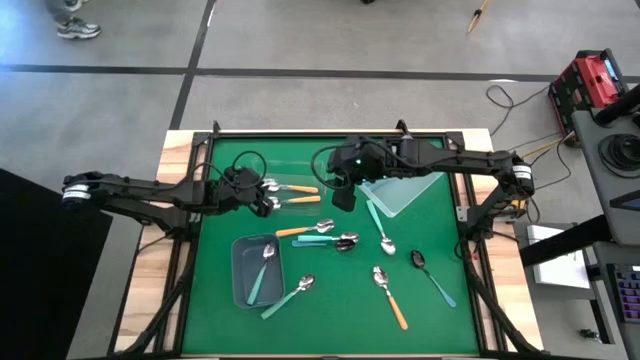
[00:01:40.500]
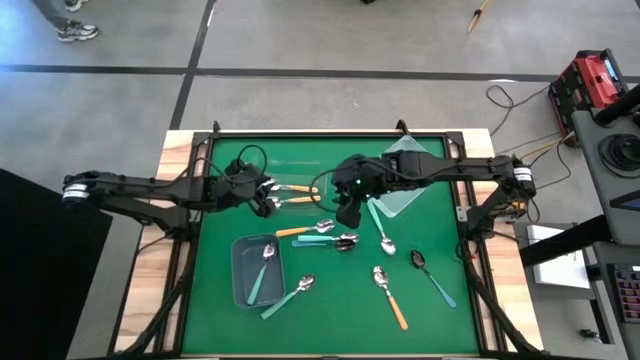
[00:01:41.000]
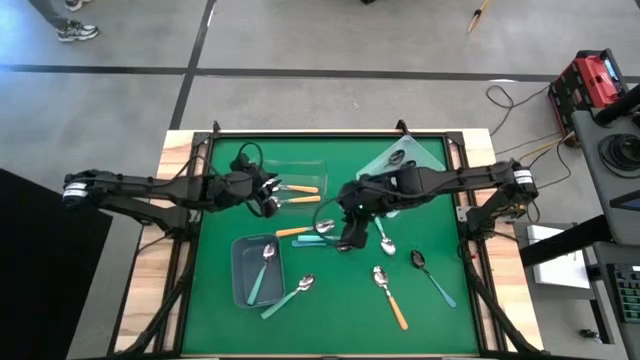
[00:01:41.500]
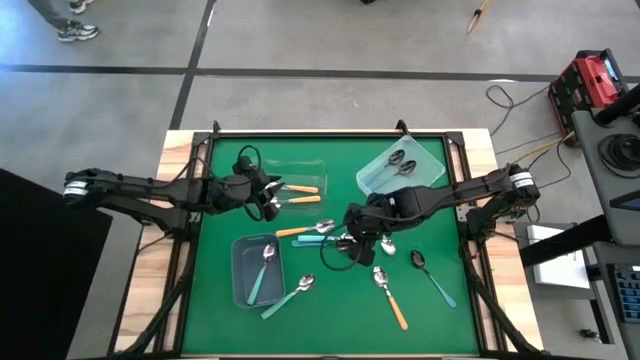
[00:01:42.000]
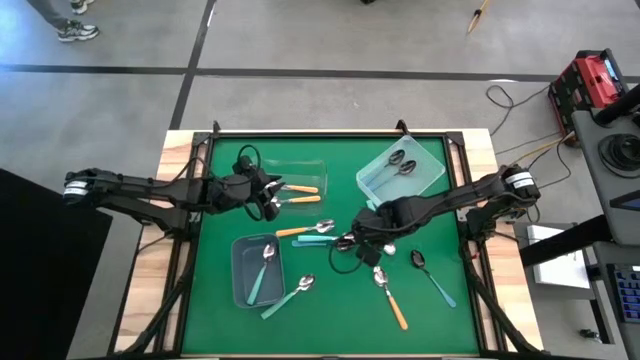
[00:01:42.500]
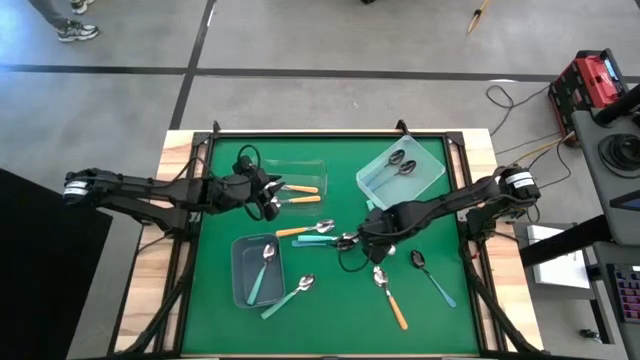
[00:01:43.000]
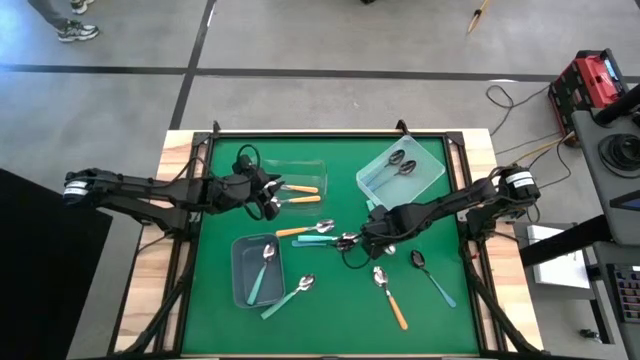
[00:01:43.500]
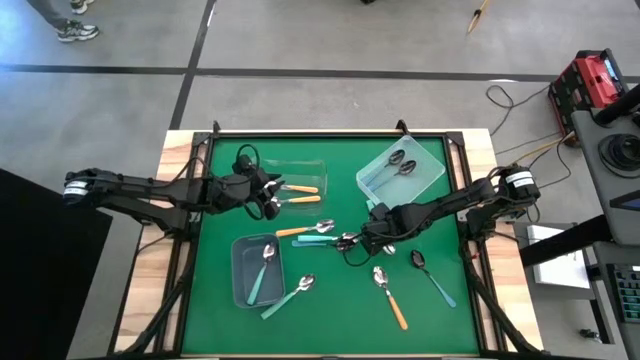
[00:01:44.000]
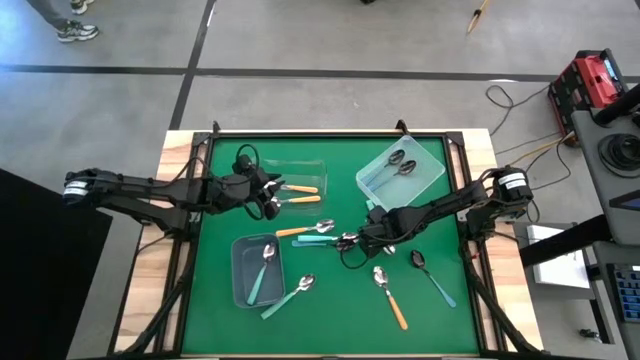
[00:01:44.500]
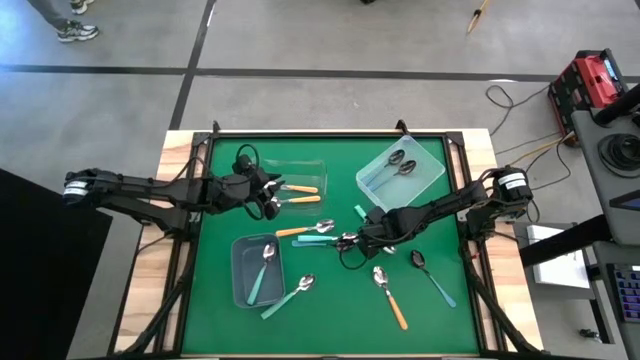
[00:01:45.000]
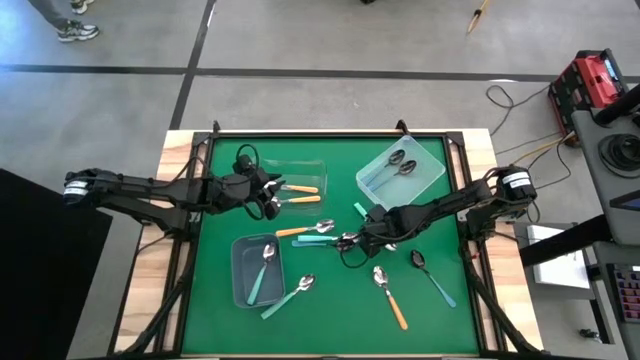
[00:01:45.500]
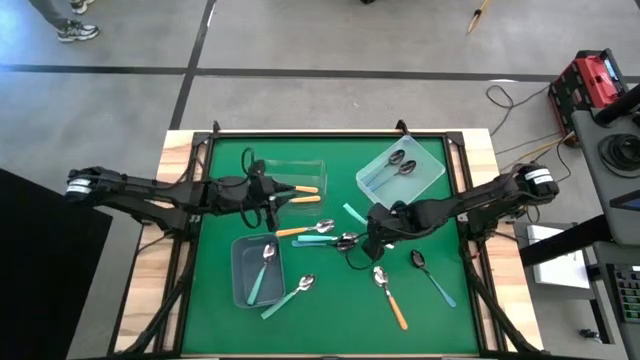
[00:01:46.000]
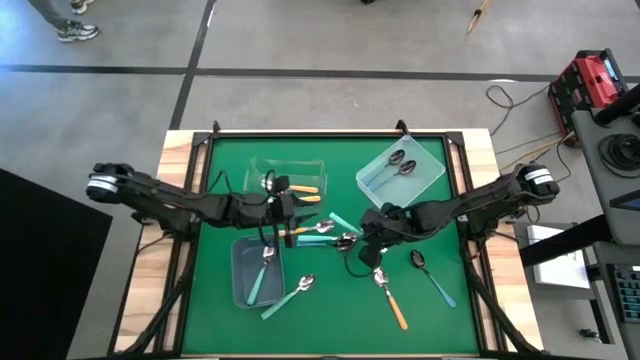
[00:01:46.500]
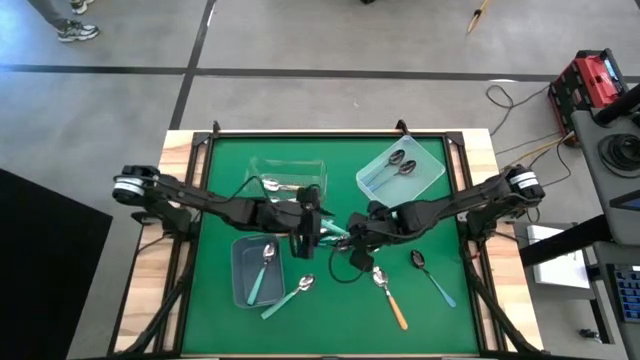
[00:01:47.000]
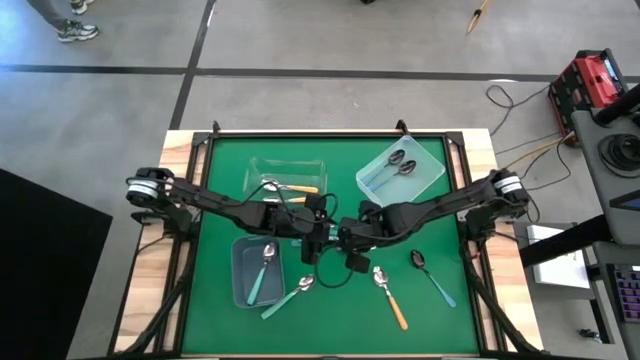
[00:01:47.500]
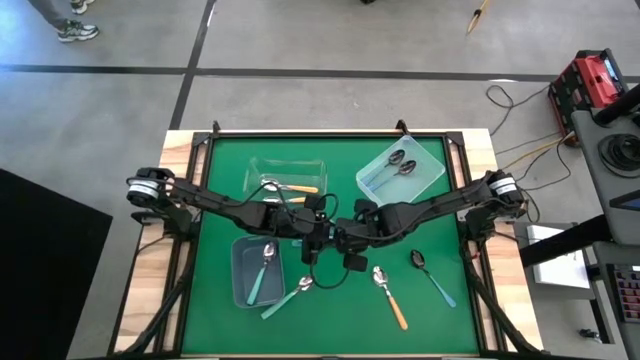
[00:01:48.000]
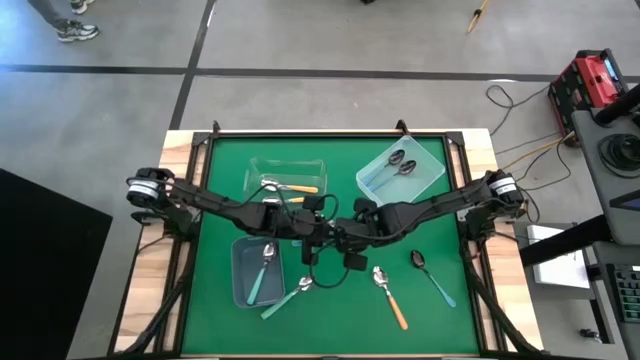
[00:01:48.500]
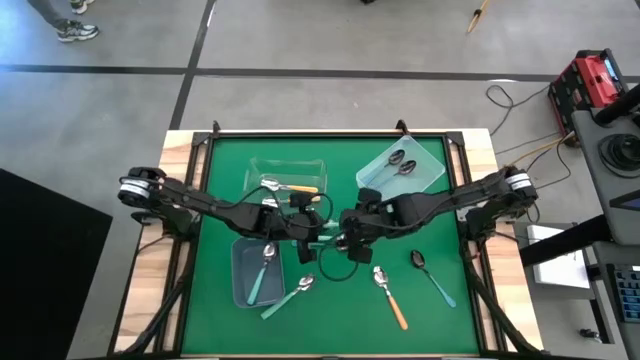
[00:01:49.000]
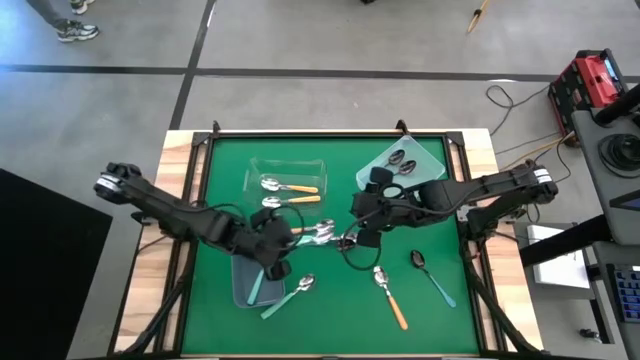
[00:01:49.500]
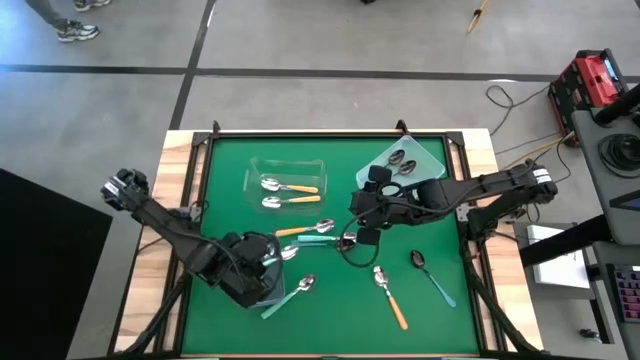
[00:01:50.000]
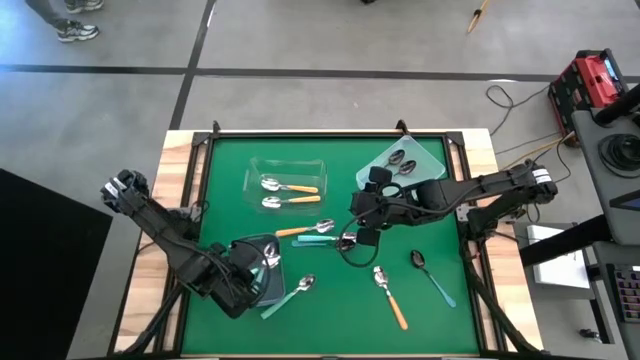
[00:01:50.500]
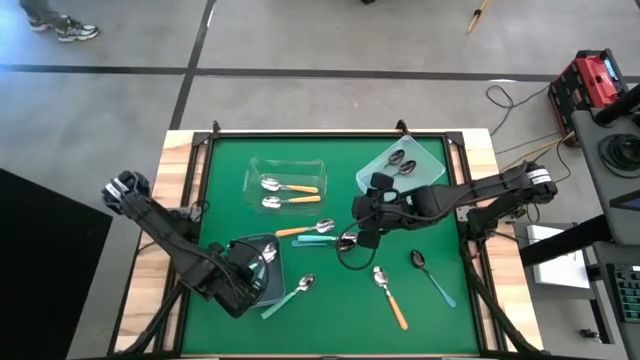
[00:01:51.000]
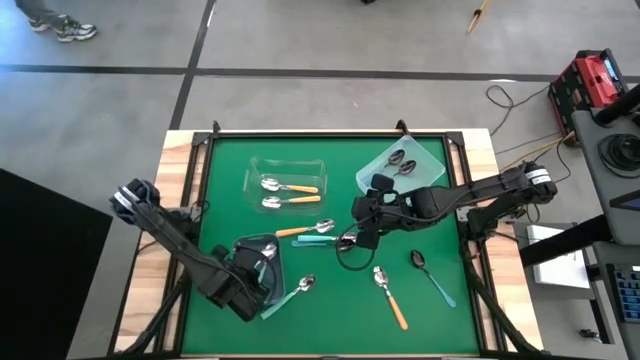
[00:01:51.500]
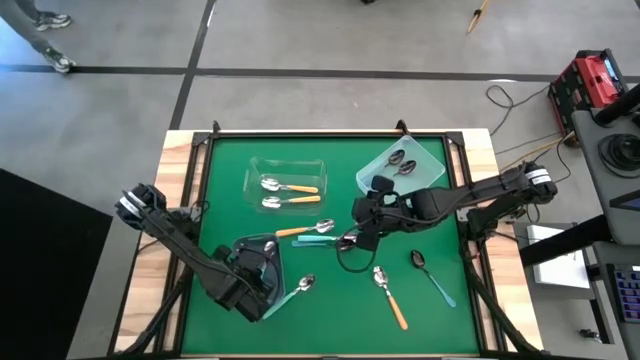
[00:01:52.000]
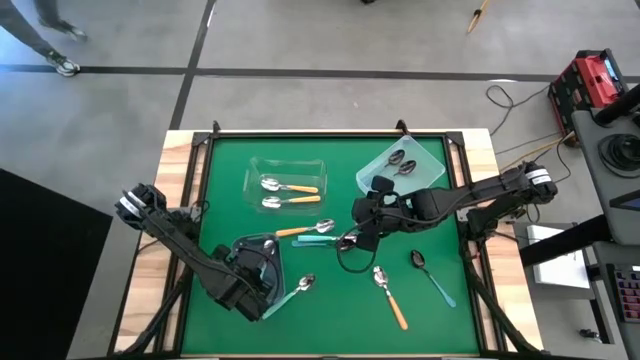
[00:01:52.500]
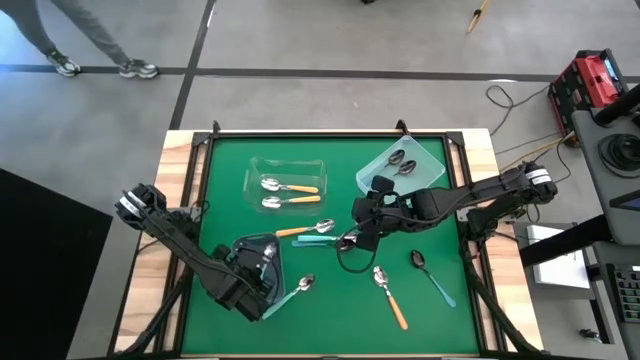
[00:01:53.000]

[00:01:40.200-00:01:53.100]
Task: Sort silverware by color (type)
Put the light blue spoon into the gray bin

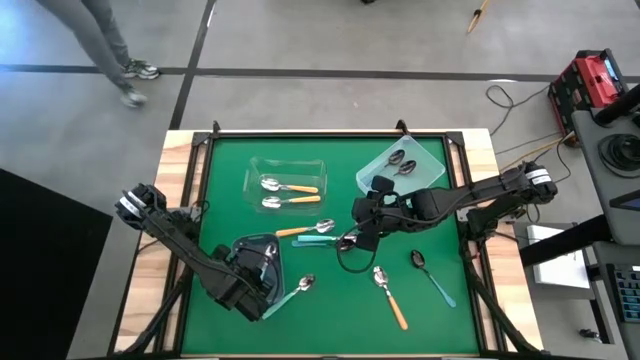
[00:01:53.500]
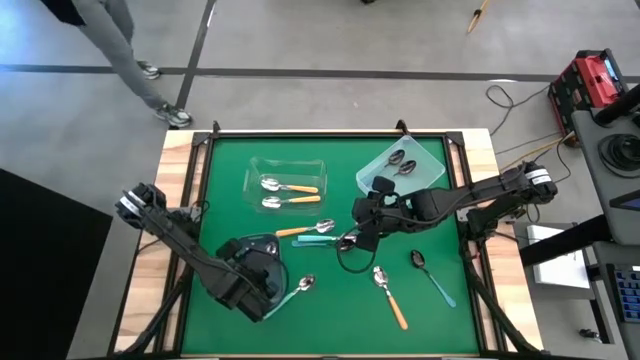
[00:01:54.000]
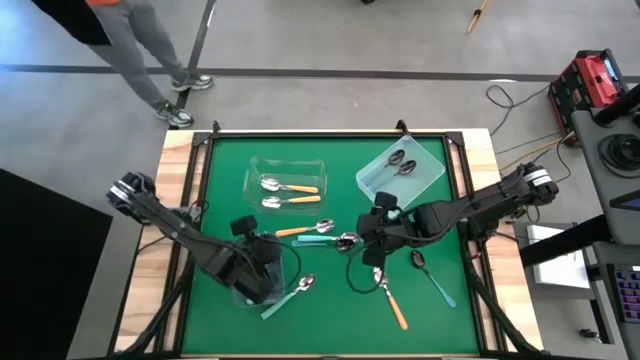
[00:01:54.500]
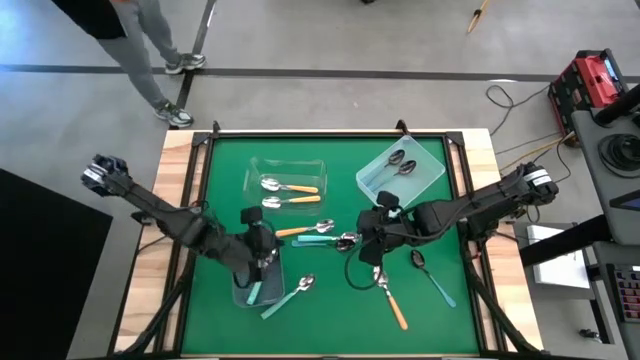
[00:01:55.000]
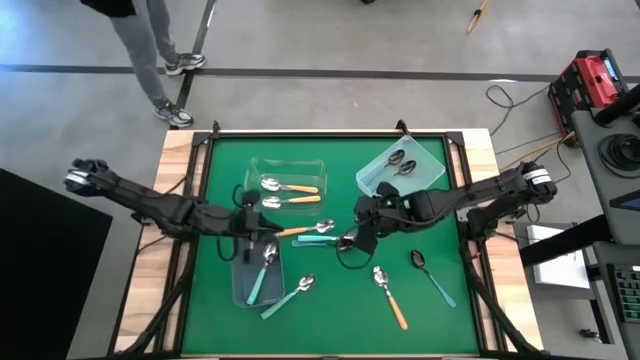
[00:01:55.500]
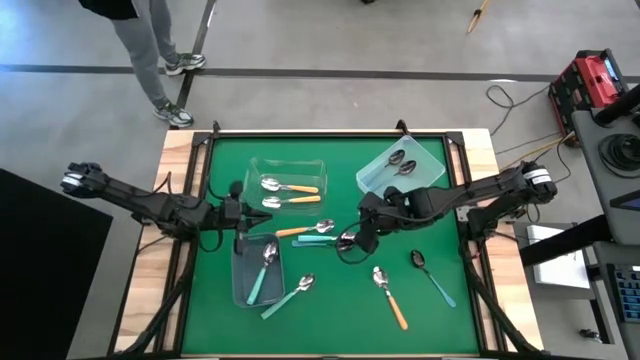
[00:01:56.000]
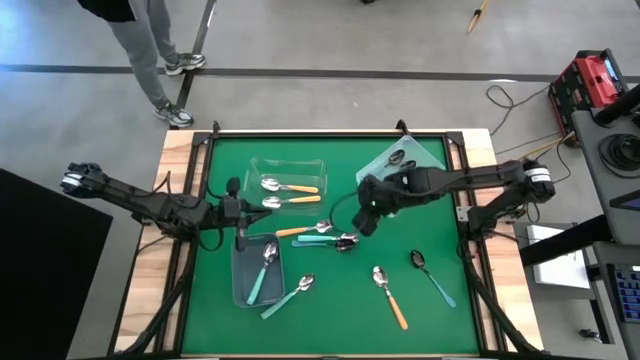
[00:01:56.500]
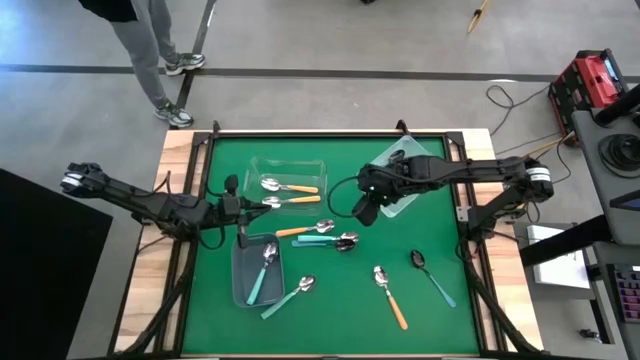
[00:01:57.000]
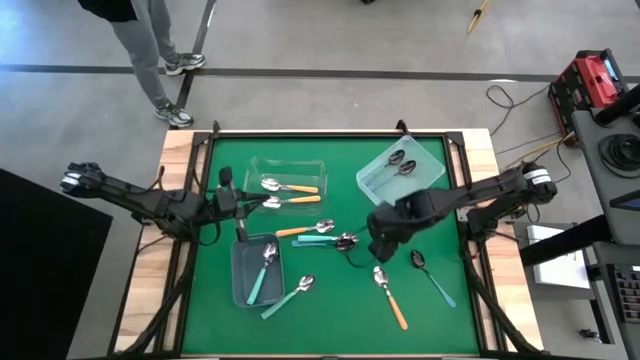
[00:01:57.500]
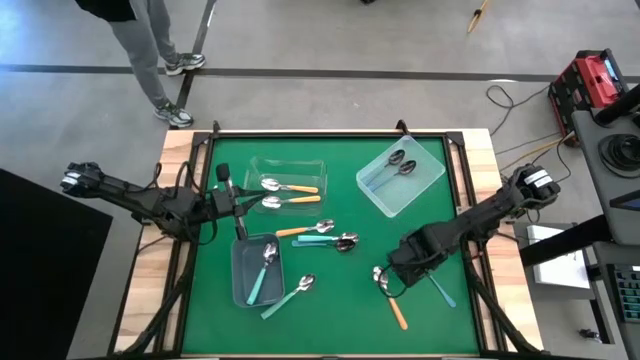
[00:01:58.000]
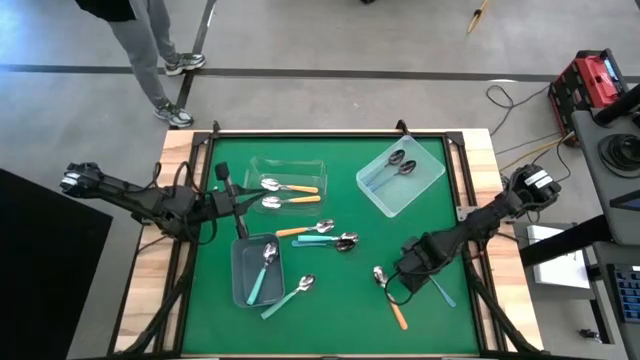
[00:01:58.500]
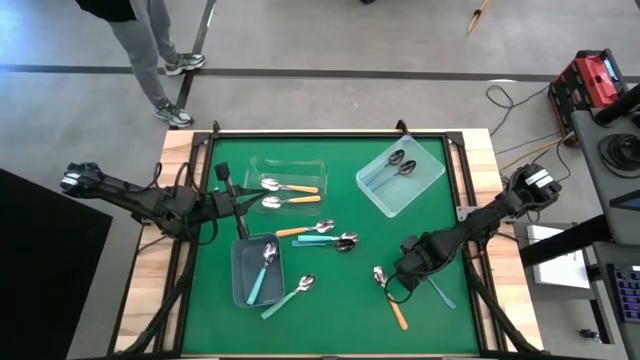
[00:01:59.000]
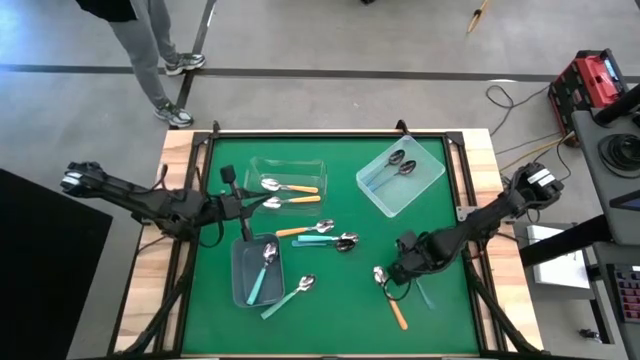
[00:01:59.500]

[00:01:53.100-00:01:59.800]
Put the blue spoon into the white bin
